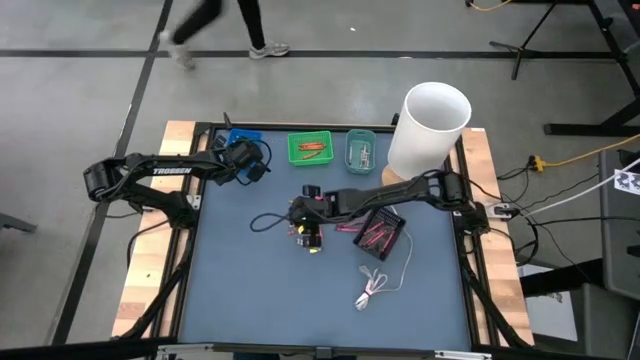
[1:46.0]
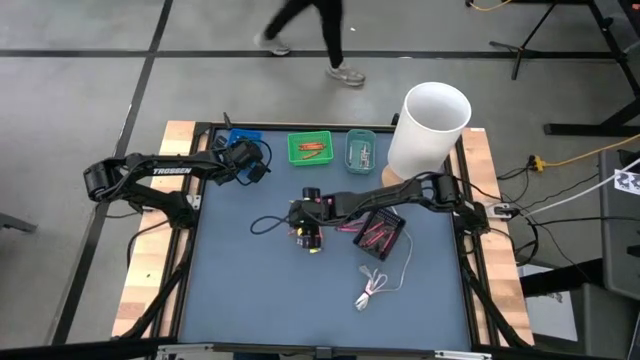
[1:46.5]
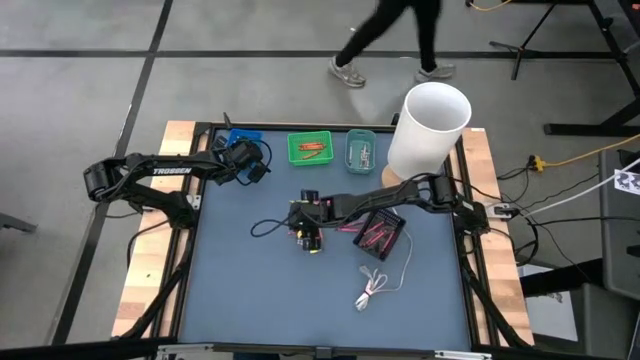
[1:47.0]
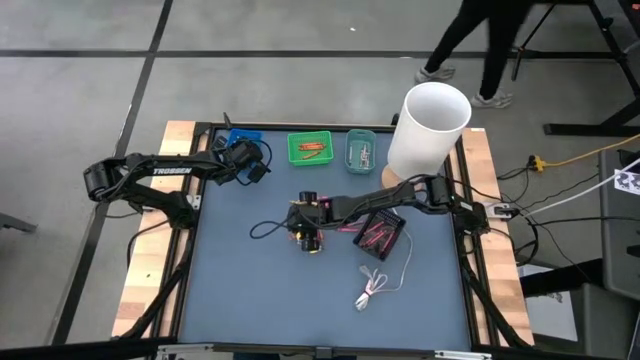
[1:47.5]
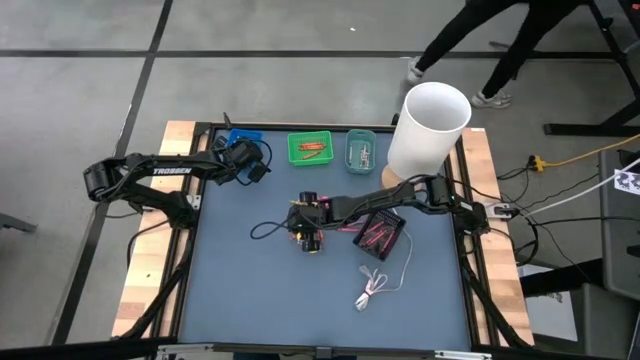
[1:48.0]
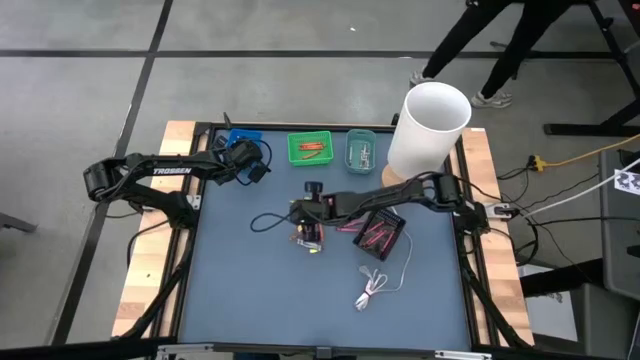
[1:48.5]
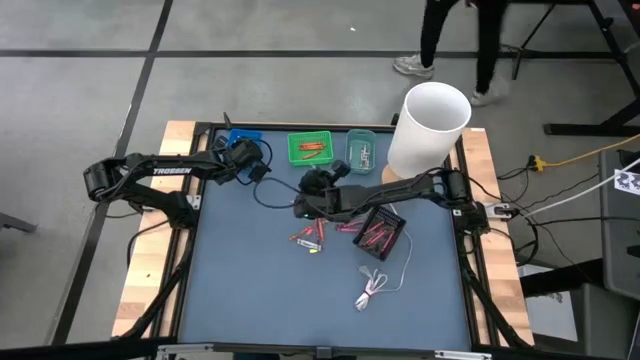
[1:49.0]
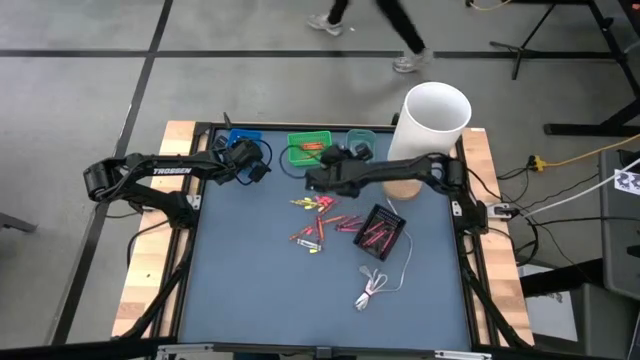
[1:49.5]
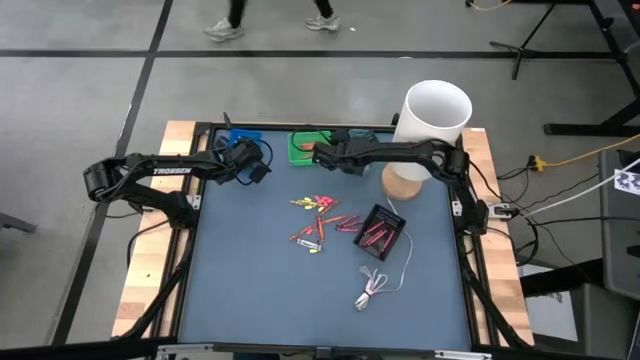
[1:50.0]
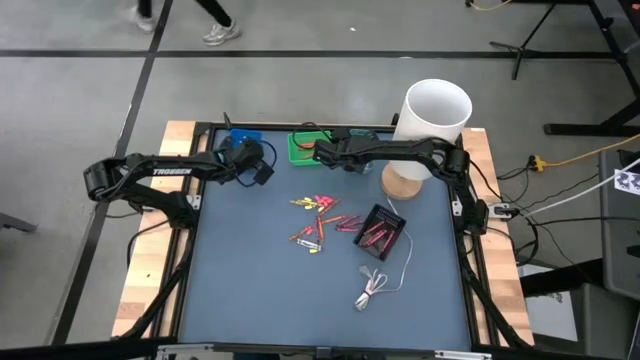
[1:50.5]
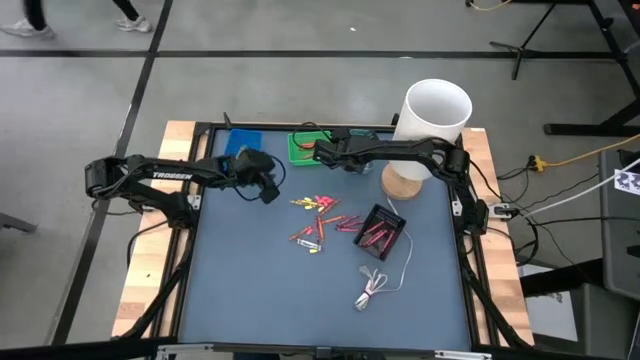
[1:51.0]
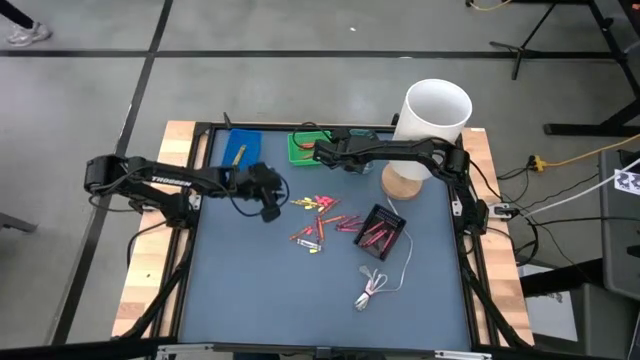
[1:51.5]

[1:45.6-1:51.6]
Task: Sort crayons
Put the gray crayon into the dark green bin

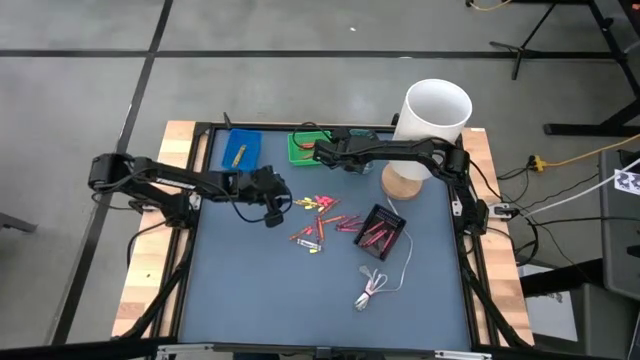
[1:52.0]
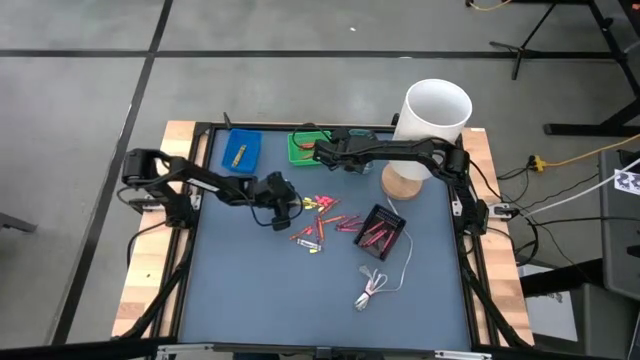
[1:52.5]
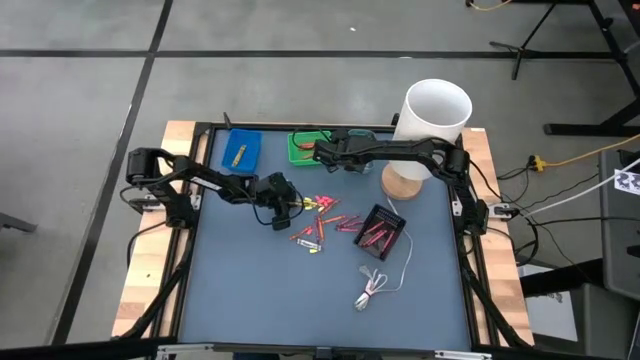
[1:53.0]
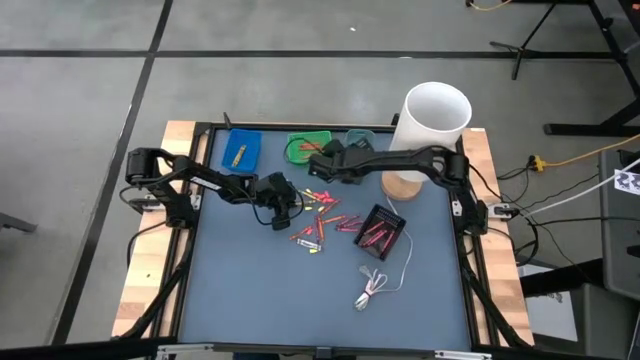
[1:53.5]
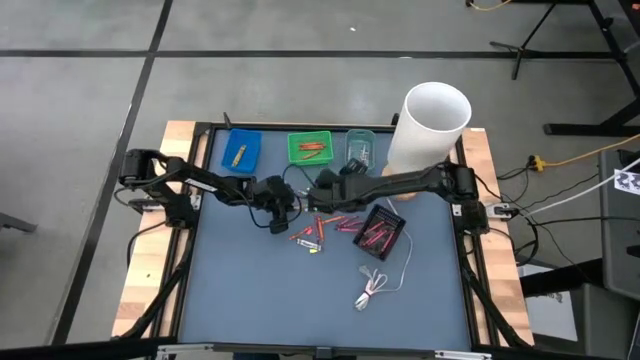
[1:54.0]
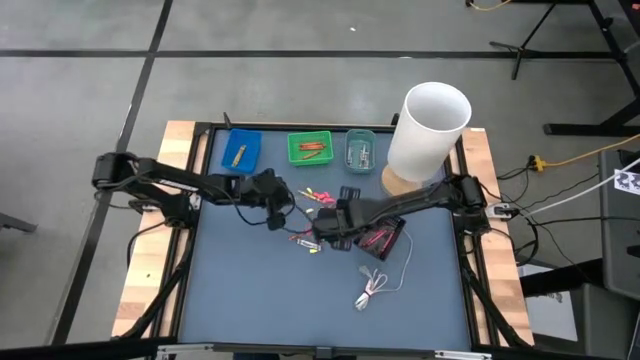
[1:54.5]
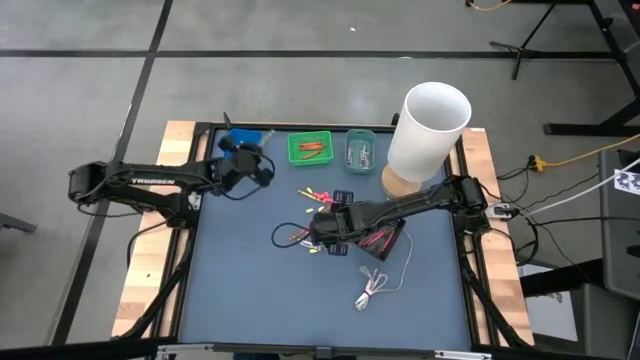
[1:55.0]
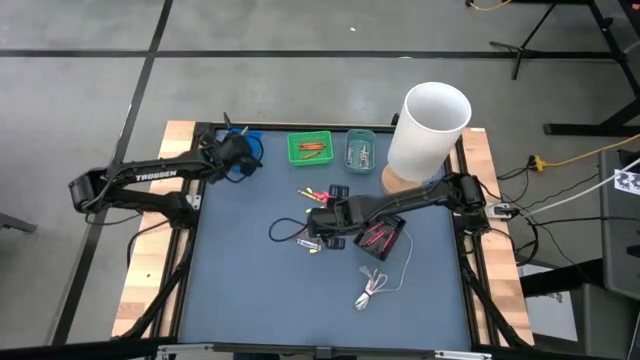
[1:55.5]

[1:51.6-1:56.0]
Put the yellow crayon into the blue bin

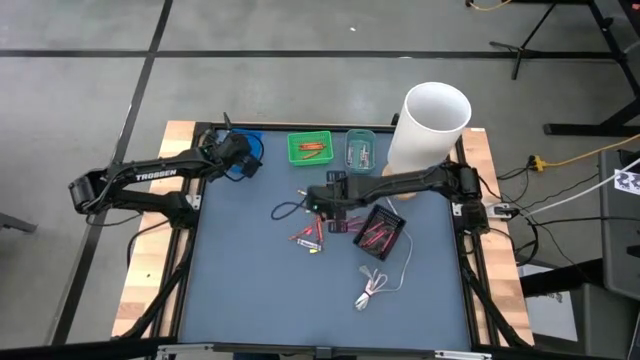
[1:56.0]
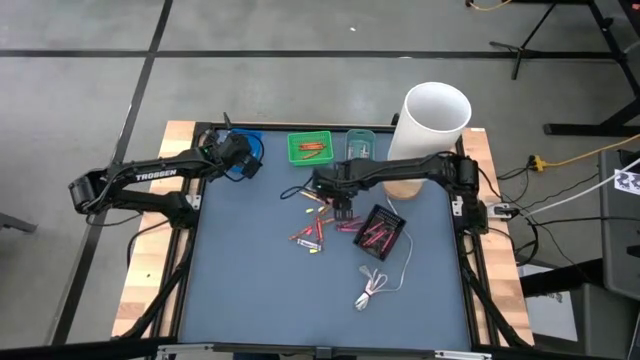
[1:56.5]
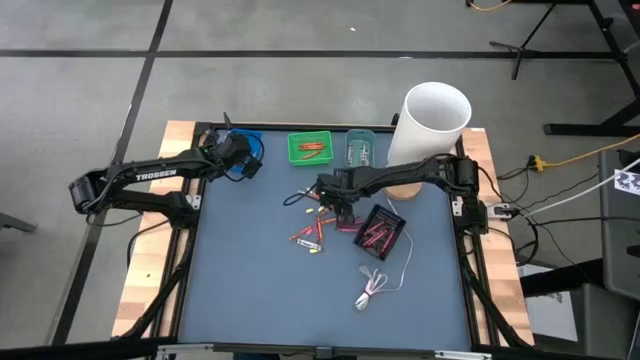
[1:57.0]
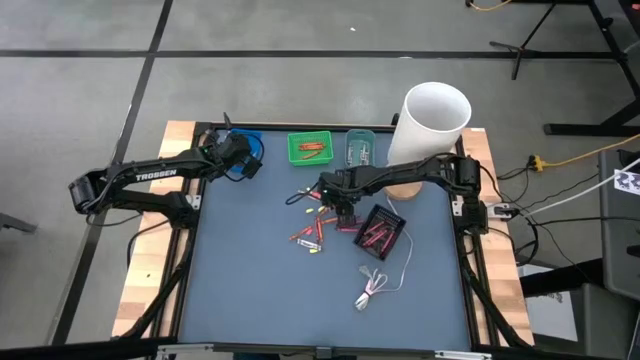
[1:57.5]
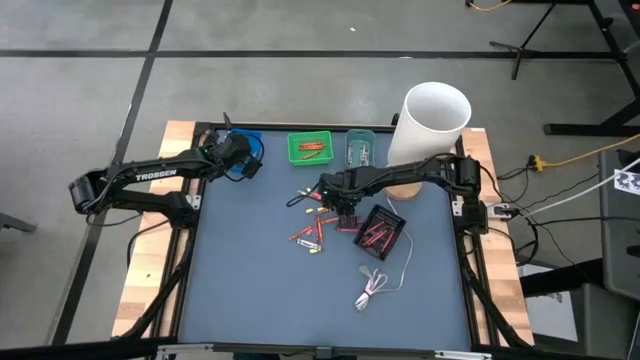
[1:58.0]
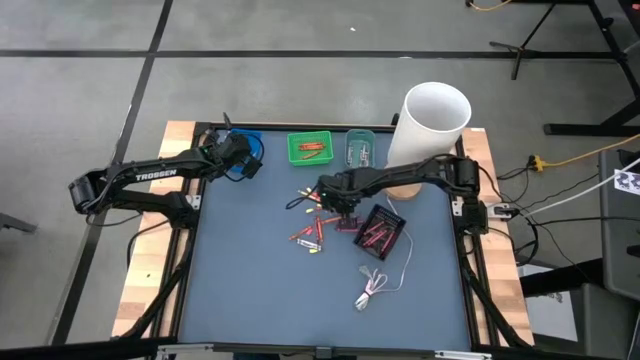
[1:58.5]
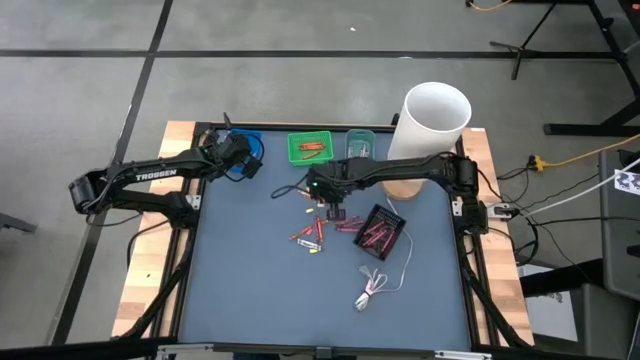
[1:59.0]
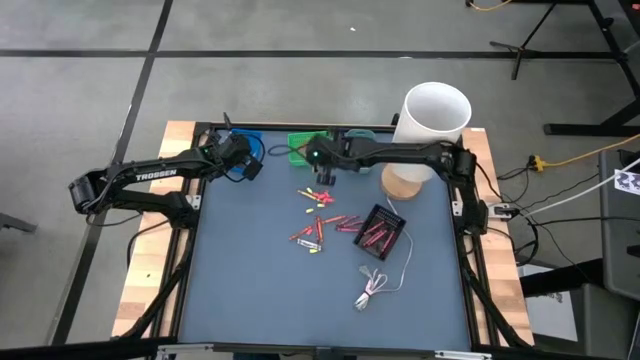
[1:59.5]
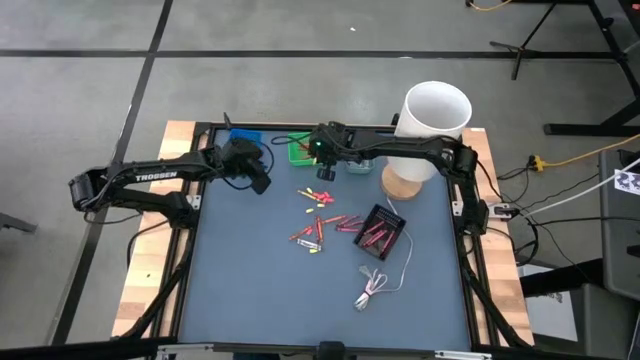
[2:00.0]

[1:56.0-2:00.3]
Put the orange crayon into the green bin

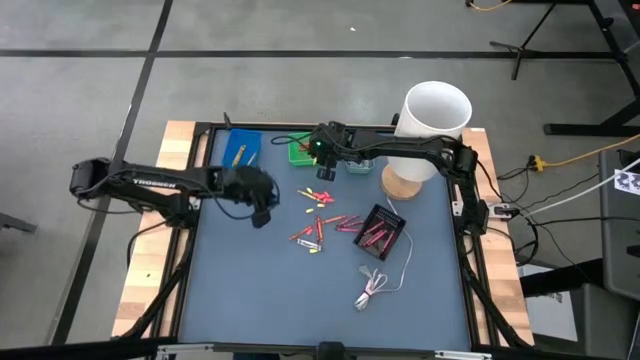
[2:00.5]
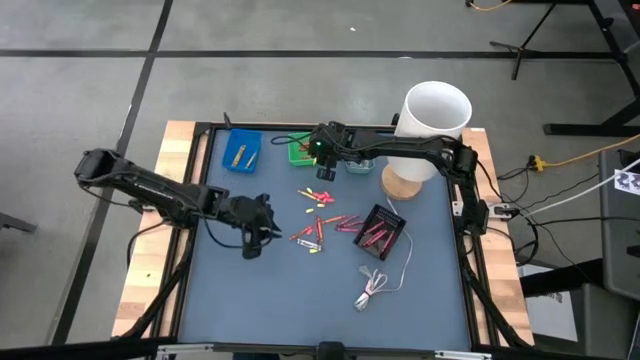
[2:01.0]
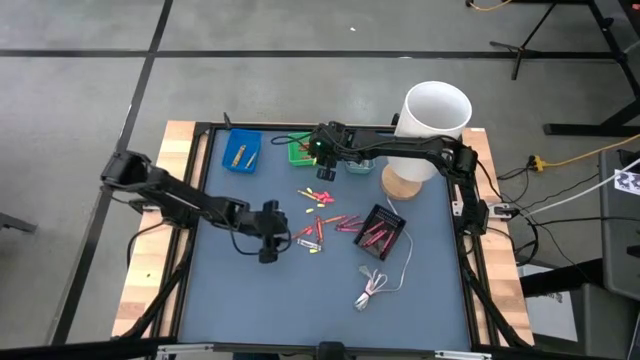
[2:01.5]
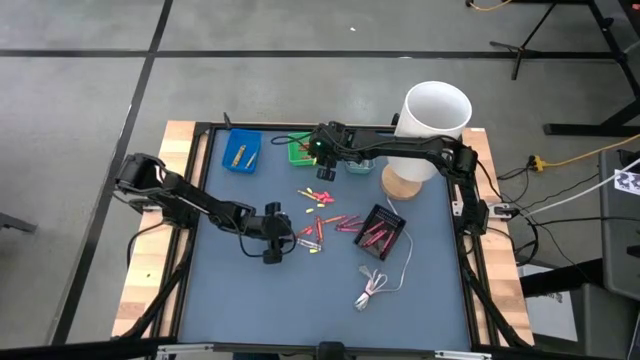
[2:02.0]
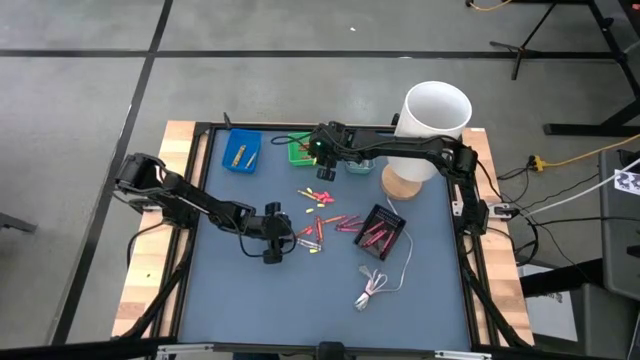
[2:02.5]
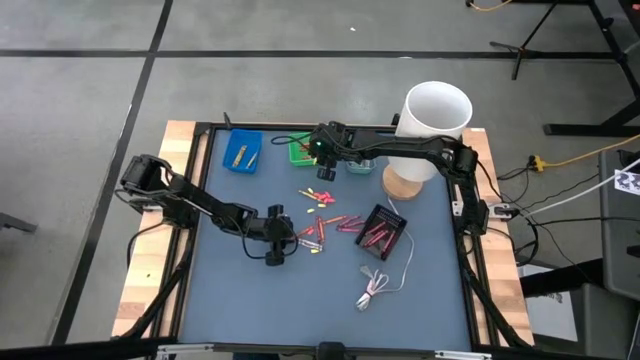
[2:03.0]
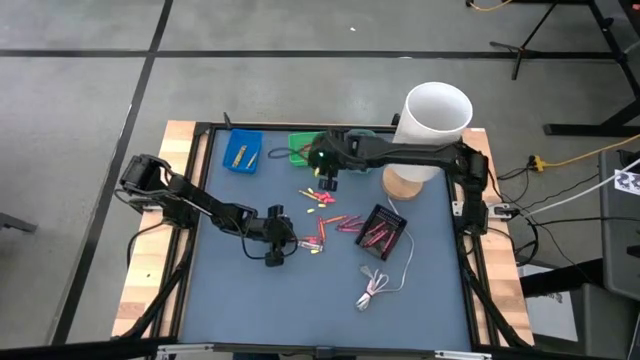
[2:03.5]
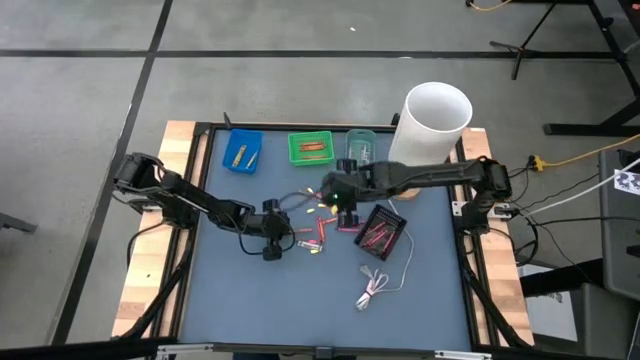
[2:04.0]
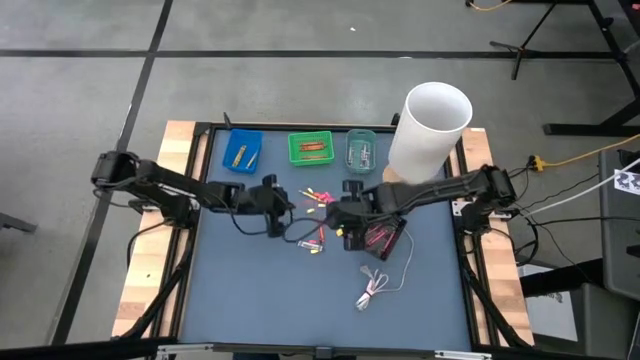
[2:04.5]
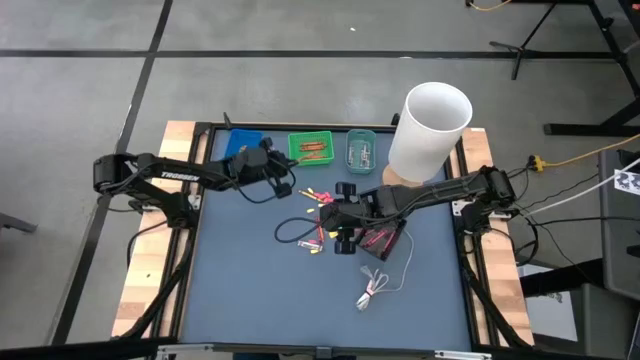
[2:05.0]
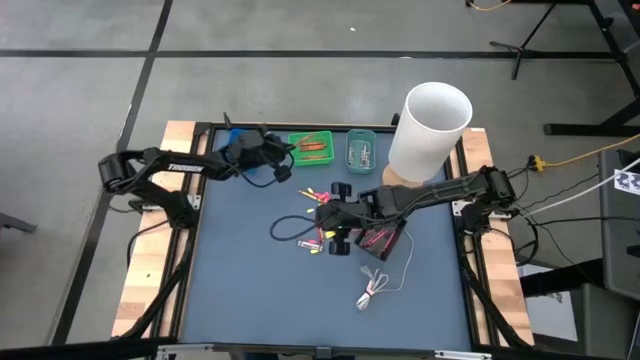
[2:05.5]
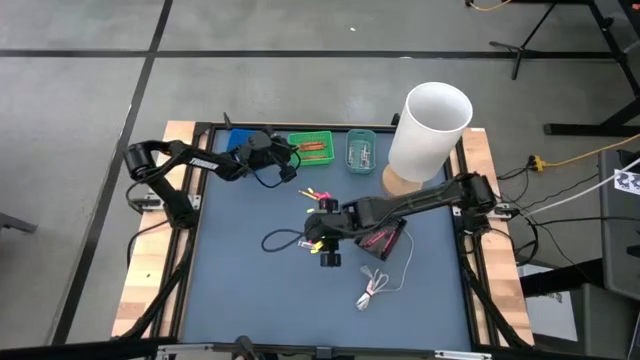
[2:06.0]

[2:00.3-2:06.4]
Put the orange crayon into the green bin
